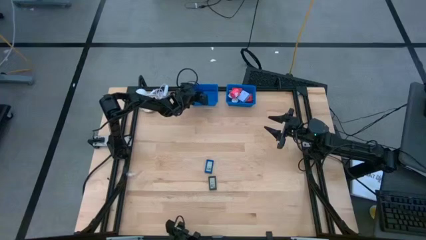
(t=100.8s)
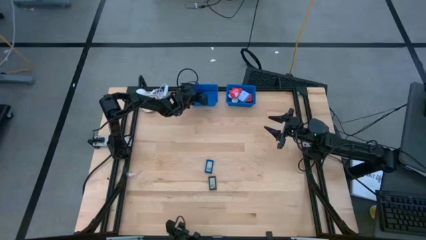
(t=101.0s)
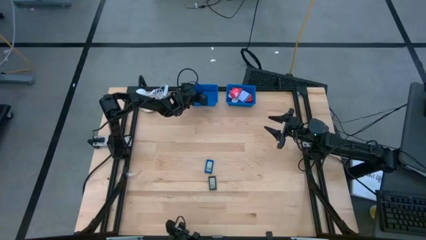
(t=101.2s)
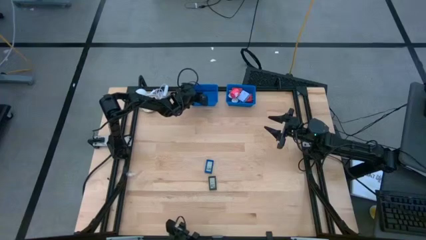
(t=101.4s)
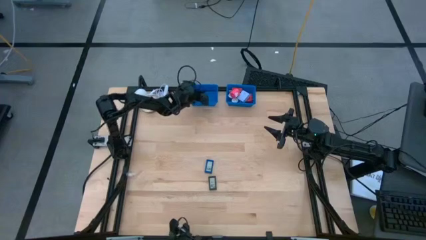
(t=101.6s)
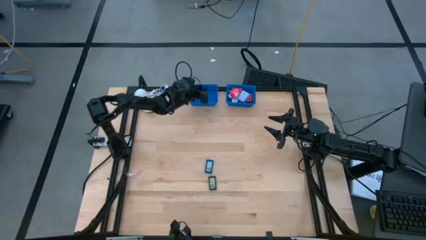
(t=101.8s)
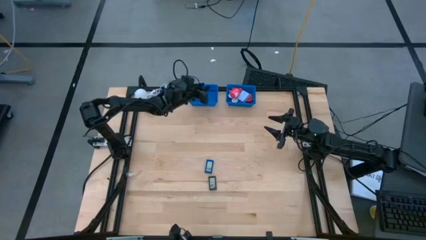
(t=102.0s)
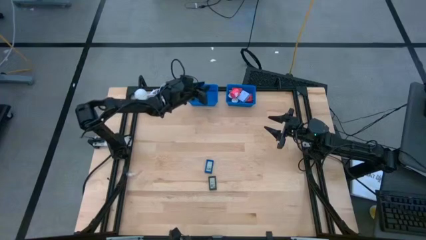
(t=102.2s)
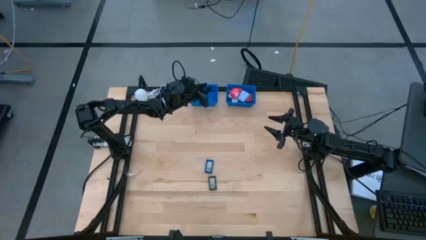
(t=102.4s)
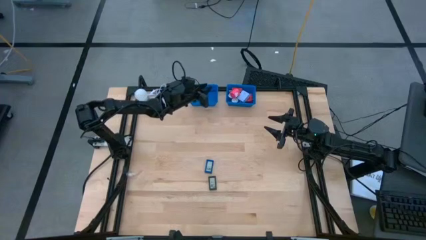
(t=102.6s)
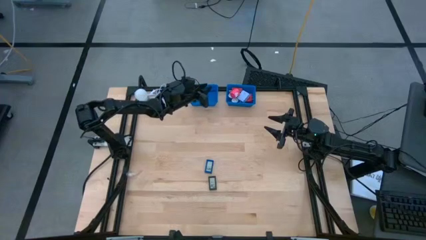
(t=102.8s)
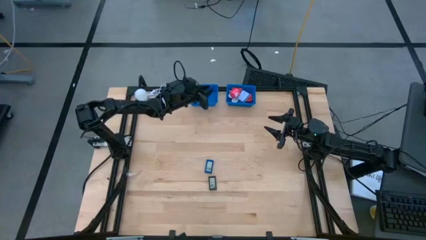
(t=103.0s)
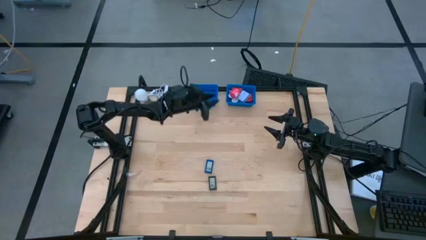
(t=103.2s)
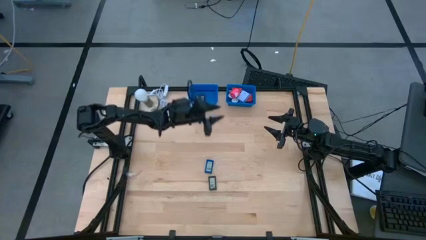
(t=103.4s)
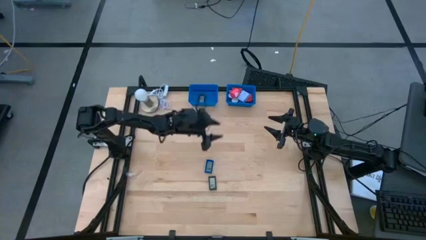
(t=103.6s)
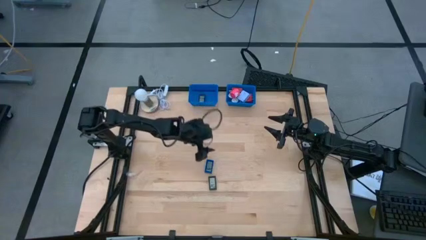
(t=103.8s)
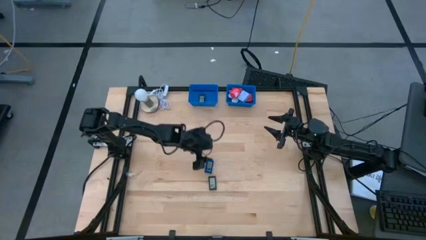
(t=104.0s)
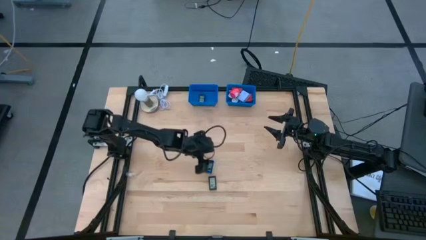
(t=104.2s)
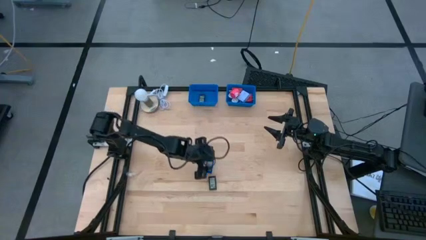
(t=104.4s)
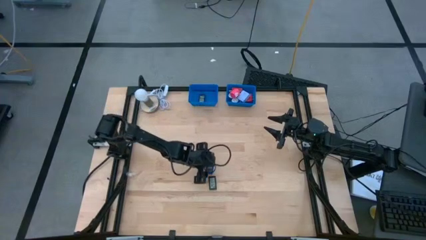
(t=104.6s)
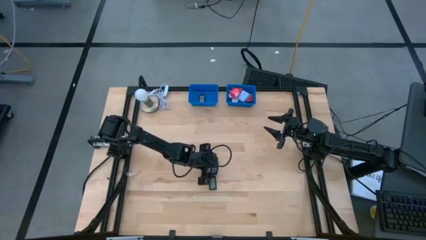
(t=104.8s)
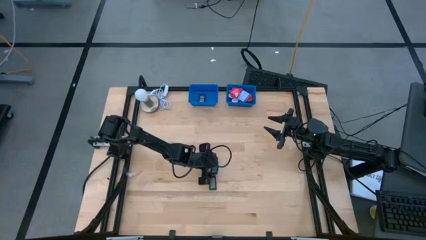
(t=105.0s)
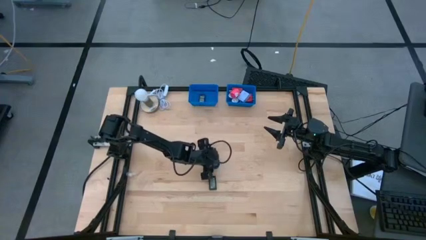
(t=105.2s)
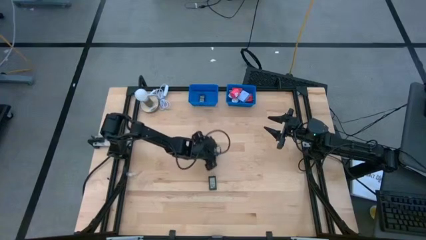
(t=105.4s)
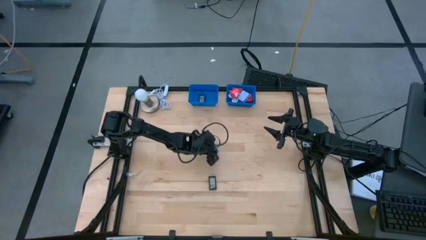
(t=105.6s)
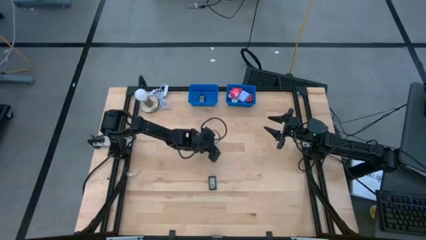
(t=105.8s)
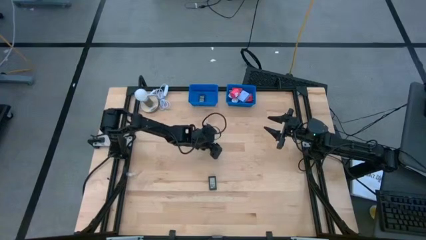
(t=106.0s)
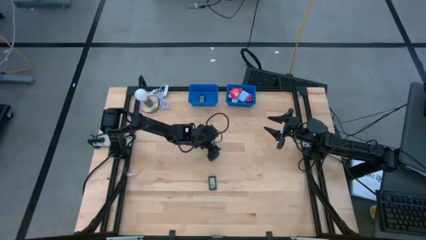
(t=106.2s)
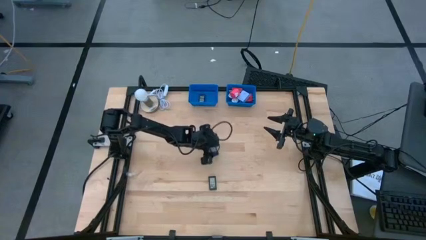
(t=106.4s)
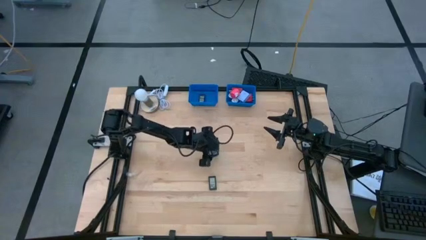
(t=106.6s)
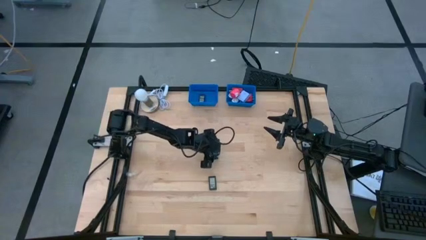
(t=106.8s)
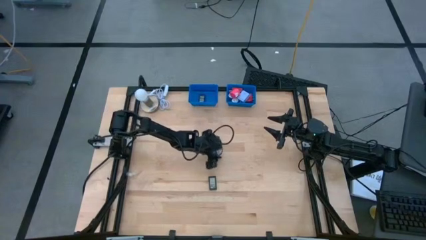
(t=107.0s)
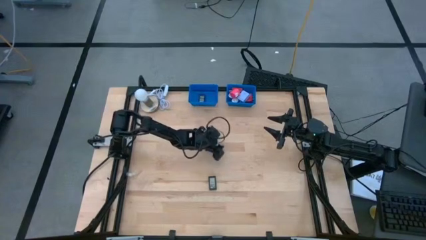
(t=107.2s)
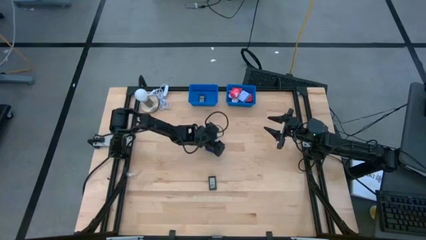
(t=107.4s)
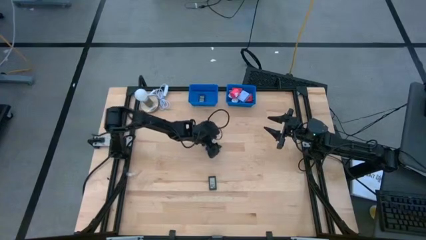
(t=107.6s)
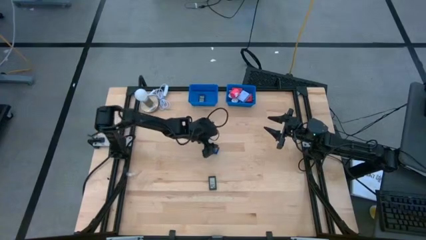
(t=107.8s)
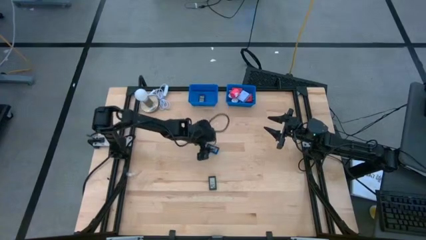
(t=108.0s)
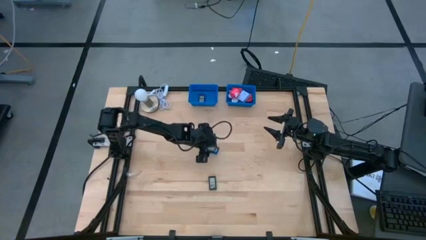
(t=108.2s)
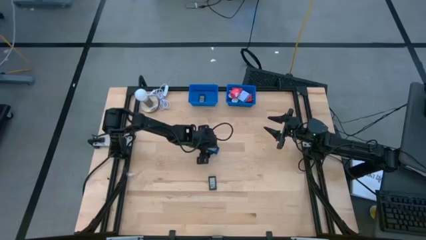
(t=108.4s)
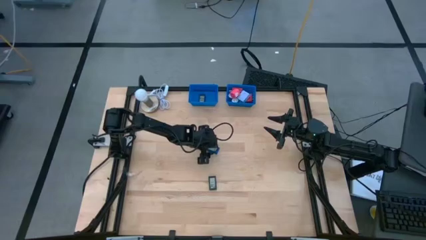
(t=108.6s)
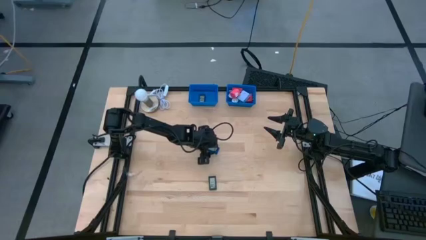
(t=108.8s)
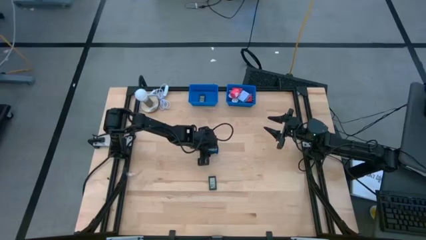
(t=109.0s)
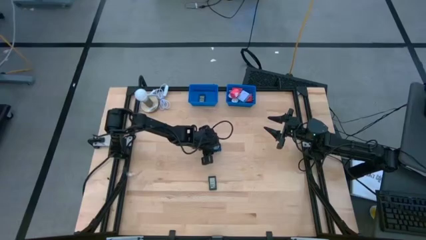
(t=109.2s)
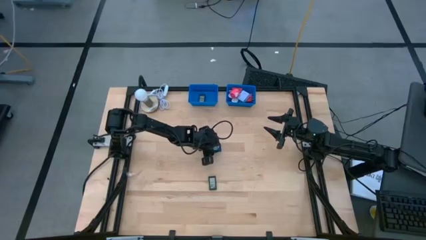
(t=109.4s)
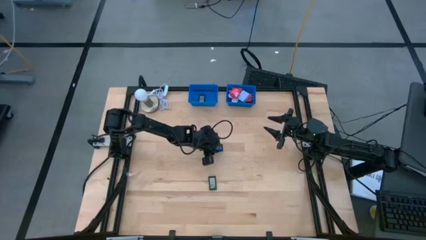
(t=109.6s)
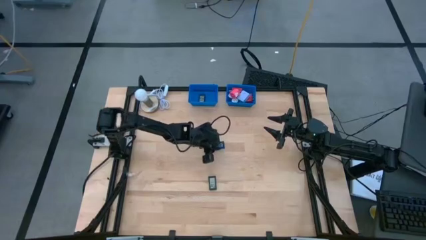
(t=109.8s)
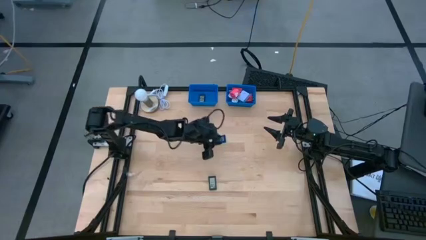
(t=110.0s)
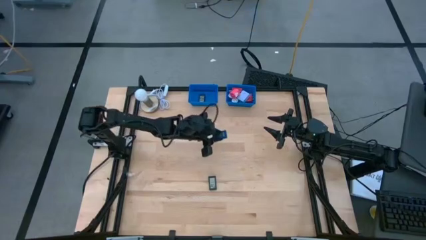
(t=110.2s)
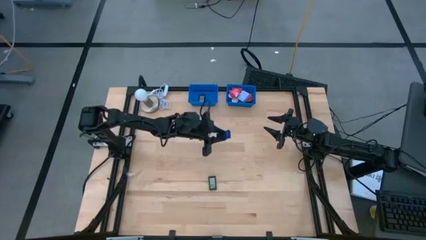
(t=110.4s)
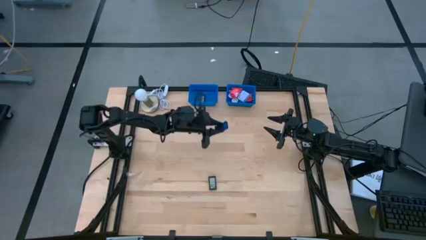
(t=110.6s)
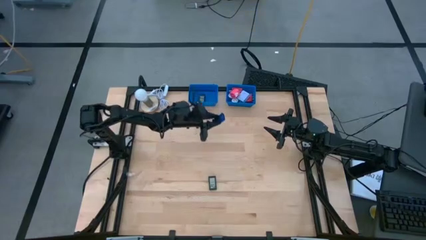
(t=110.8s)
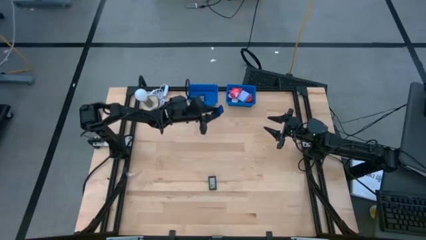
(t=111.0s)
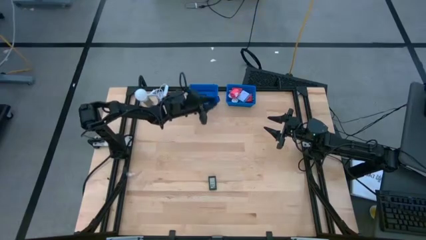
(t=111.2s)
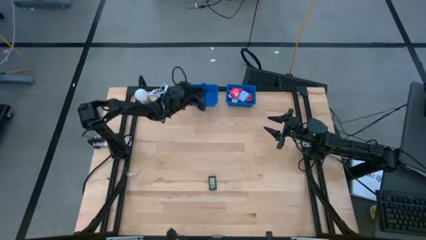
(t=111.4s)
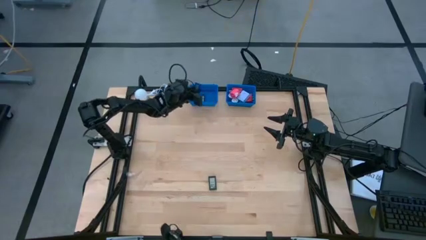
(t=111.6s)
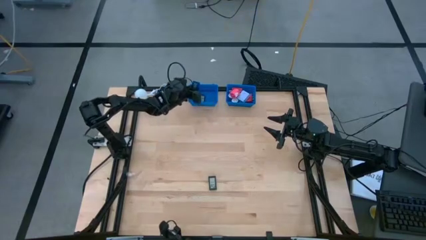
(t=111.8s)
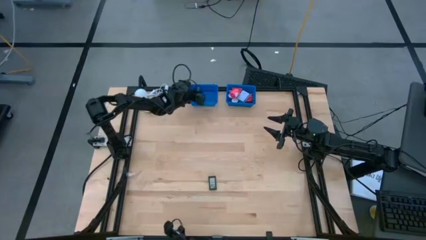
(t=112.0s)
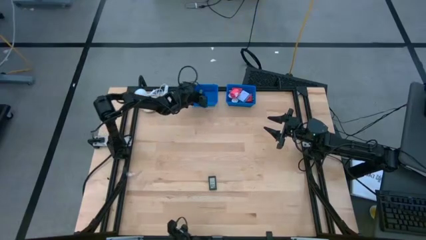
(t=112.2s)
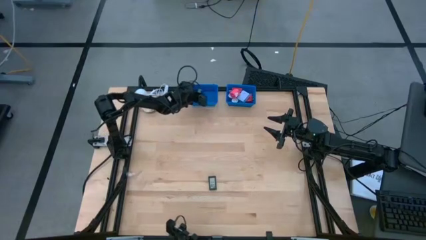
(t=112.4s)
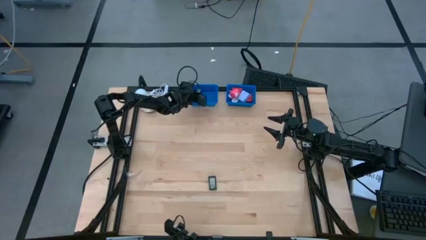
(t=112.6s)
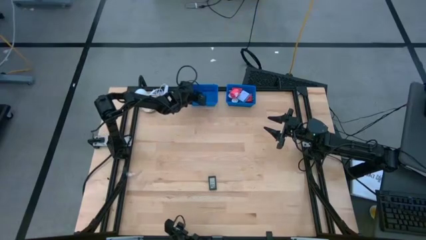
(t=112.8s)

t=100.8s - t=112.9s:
Task: Pick & Place Office items
Put the blue digital timer into the left blue bin
